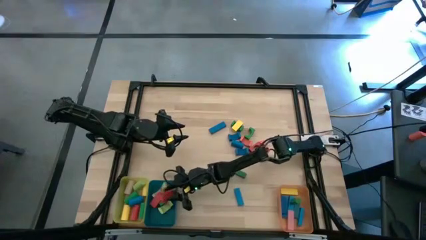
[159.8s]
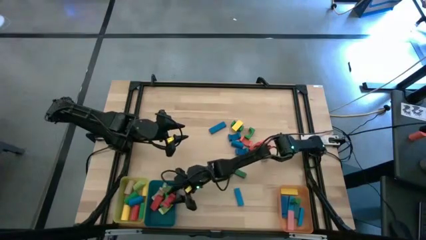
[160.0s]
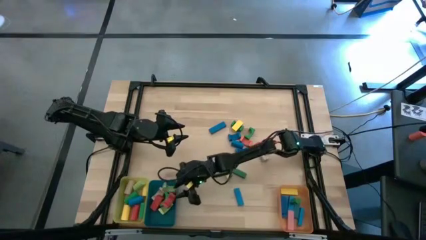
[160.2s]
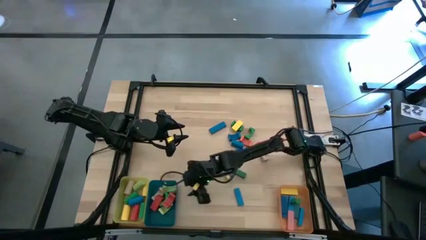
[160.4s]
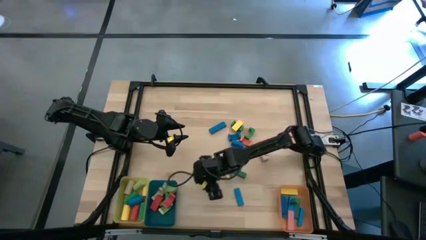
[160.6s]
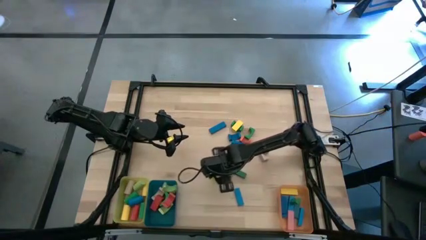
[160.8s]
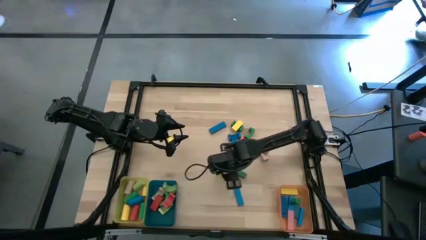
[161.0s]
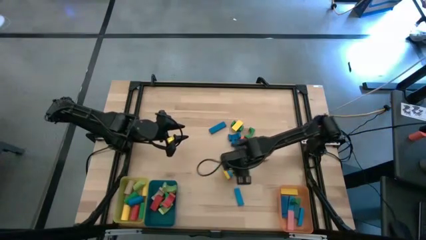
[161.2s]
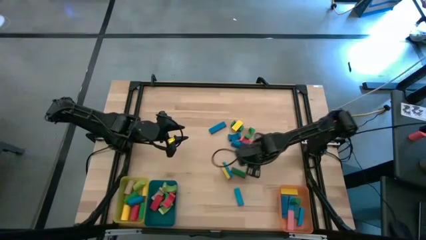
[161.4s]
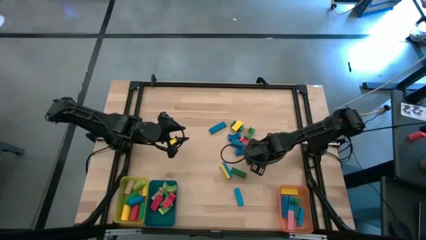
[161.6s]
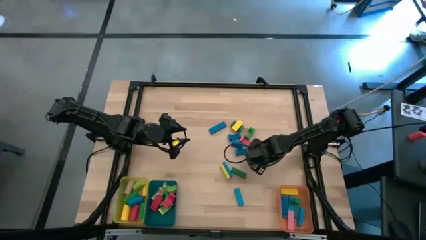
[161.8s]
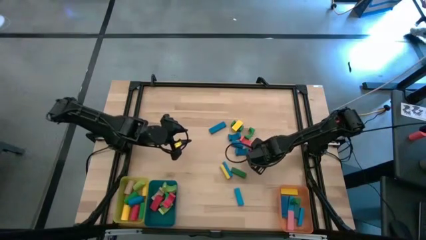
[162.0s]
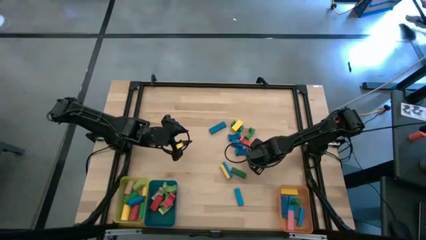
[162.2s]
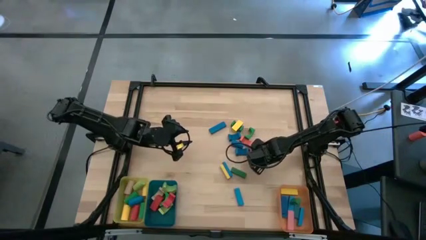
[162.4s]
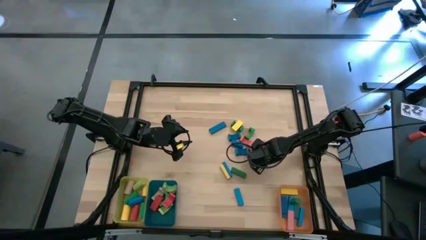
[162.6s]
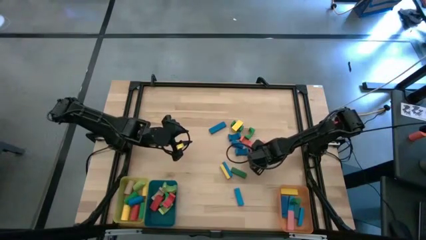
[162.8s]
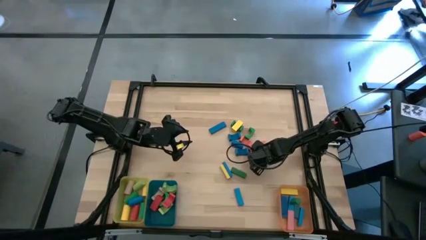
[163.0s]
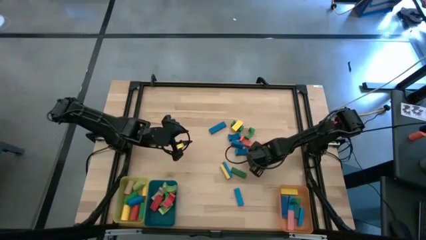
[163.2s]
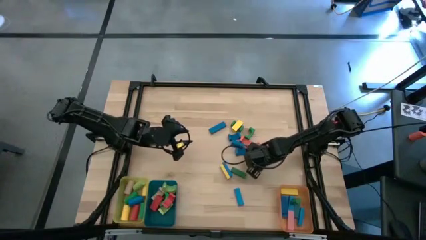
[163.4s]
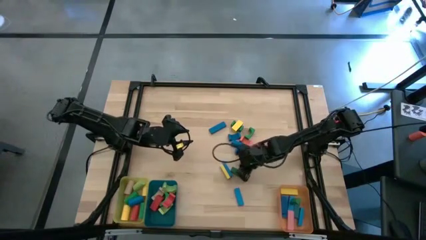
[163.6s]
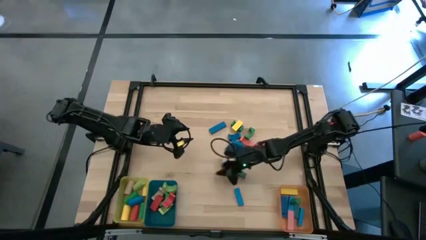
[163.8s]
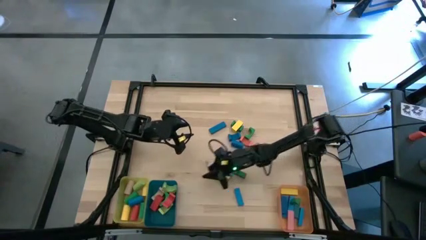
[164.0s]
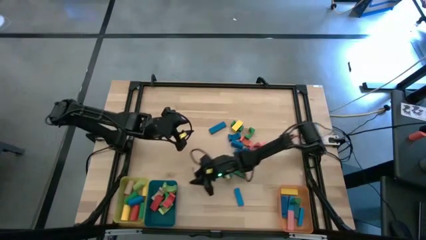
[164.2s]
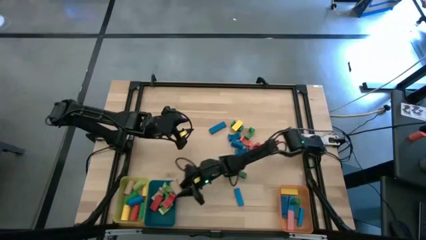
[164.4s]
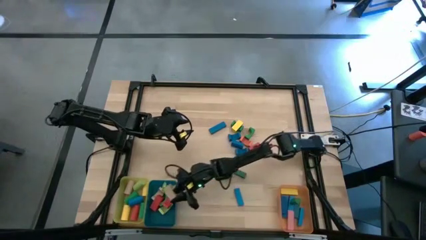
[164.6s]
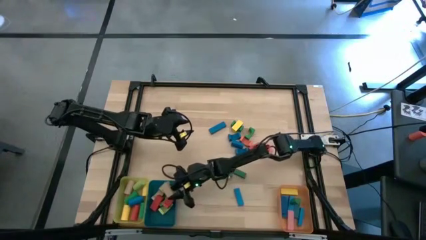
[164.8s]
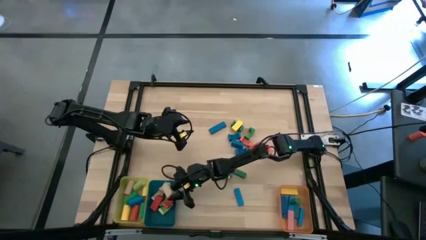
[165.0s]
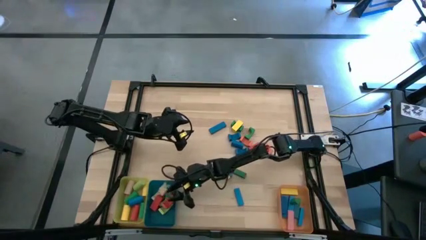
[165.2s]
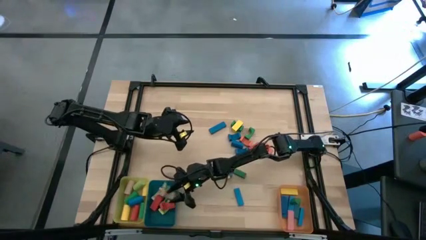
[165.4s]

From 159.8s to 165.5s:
Task: Sort blocks by size
Put the brown arch block into the blue bin

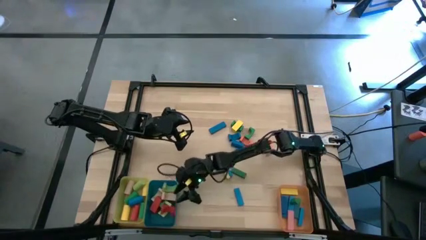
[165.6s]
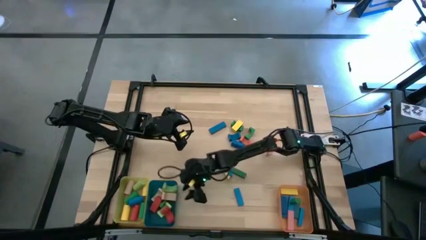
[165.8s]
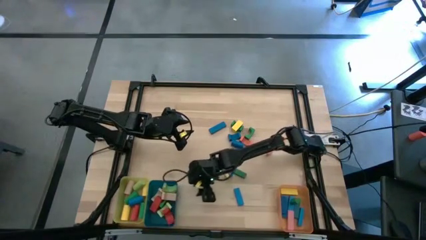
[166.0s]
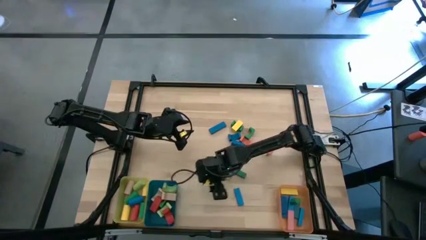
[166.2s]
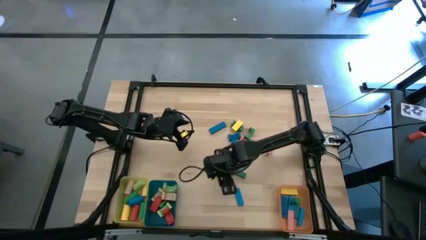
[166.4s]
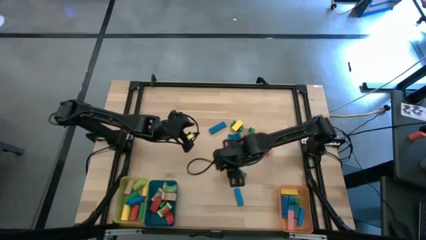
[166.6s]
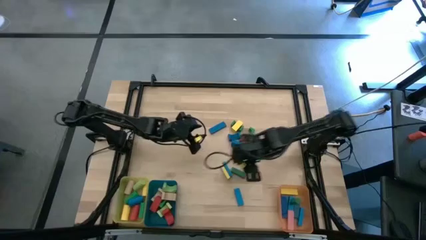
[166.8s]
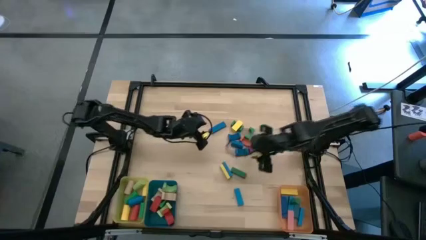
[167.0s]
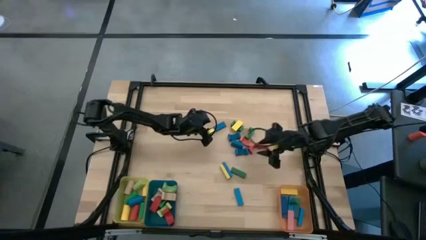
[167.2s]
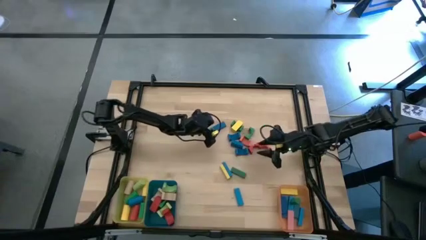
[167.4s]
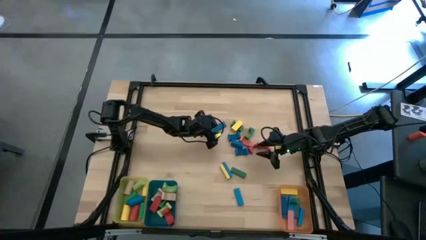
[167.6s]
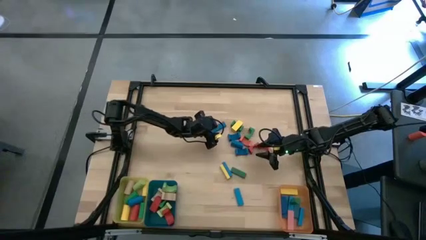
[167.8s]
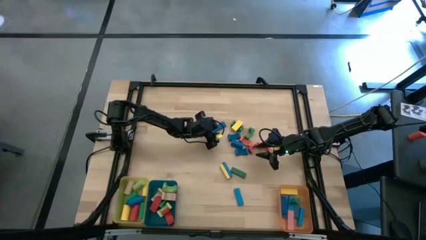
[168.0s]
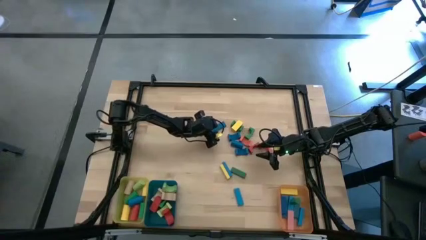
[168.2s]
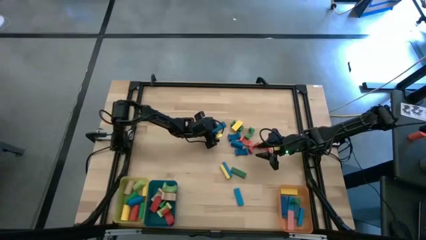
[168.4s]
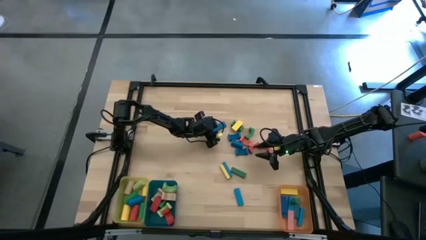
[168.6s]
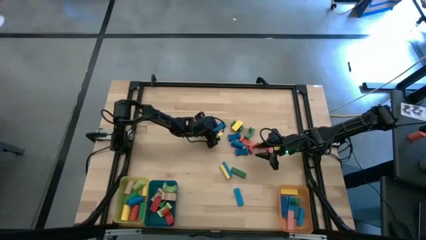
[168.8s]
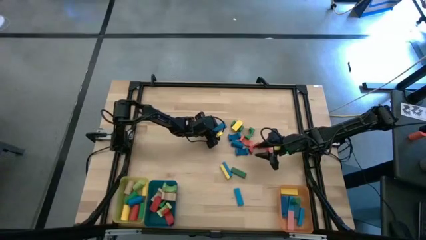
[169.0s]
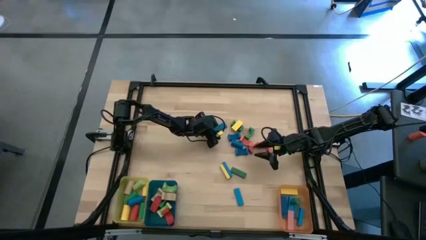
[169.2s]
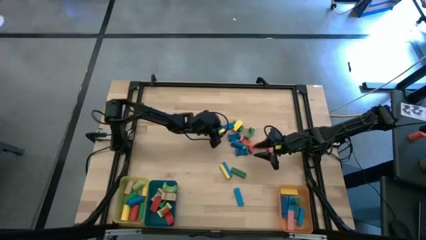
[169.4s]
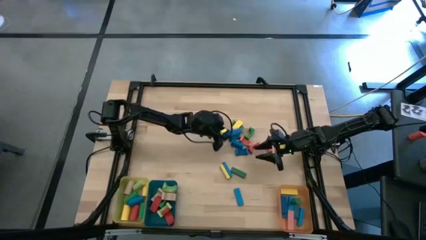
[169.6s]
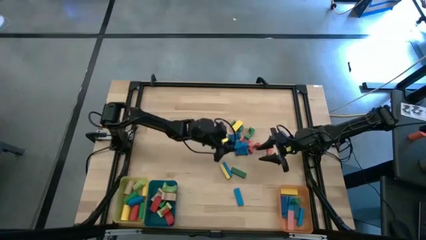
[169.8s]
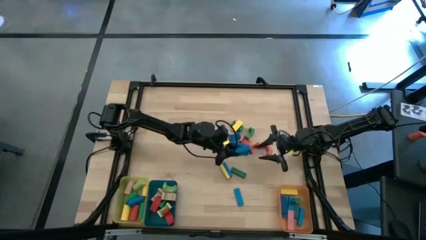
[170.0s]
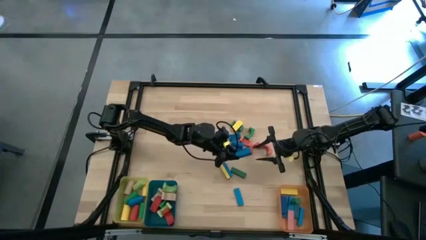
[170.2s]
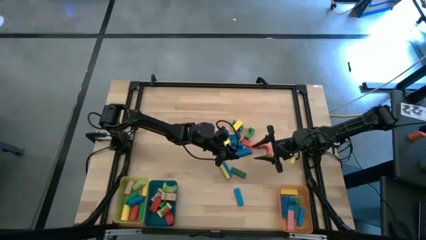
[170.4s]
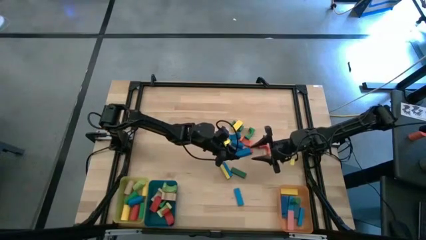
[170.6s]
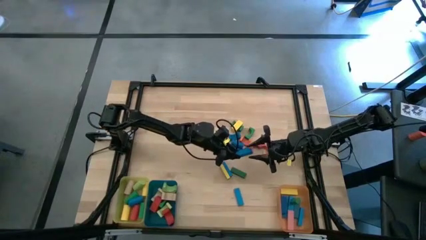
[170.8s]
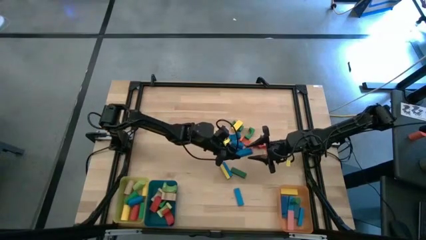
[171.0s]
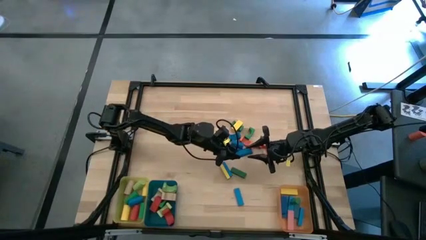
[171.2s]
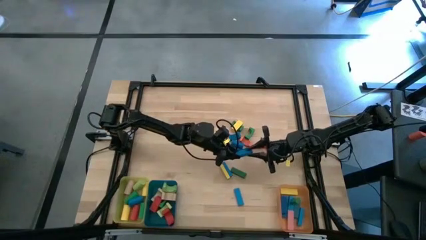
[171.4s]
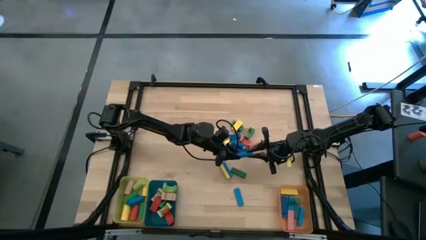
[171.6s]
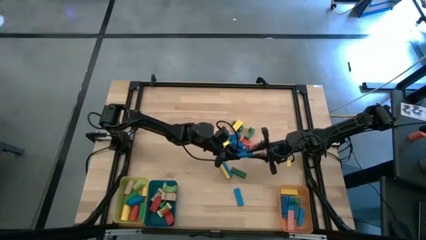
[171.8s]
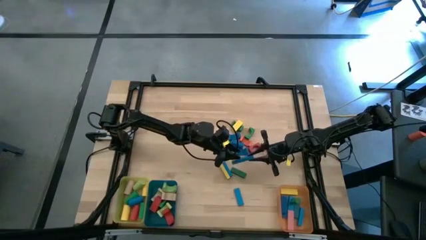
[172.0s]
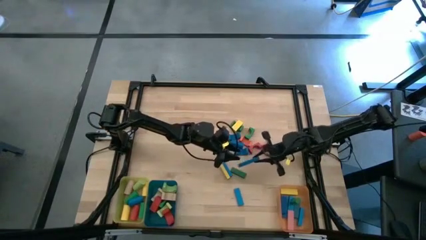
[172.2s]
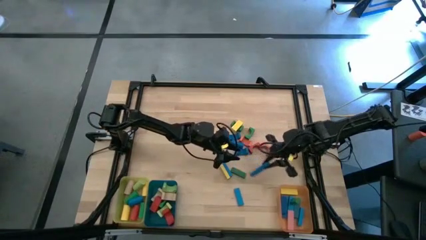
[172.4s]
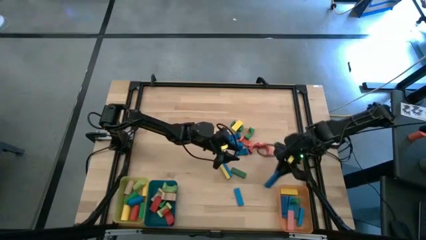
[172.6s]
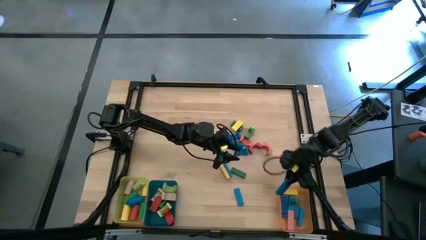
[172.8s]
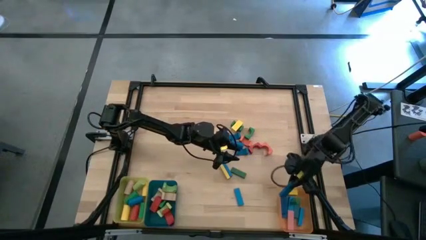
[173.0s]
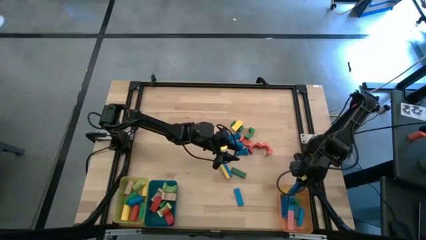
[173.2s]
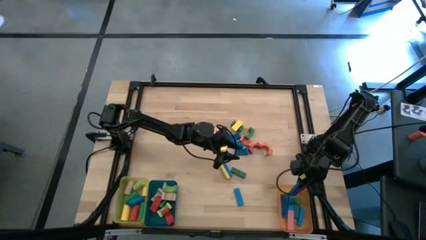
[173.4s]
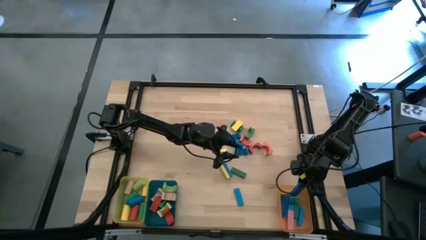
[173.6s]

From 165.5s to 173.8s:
Put the blue rectangular block into the orange bin

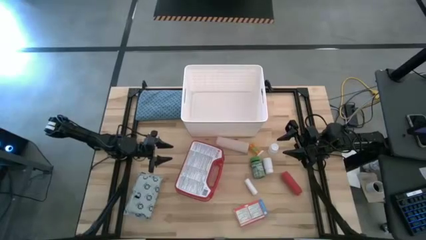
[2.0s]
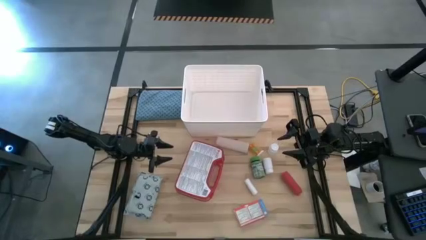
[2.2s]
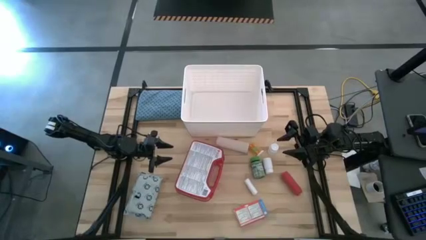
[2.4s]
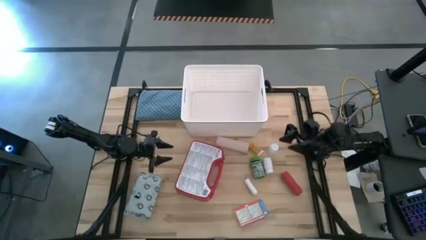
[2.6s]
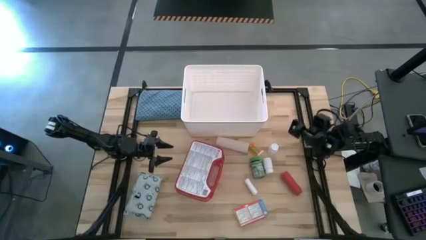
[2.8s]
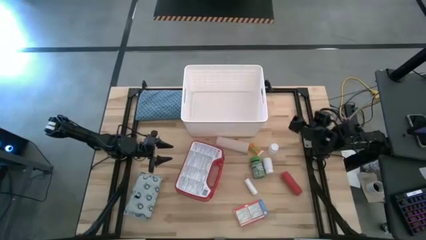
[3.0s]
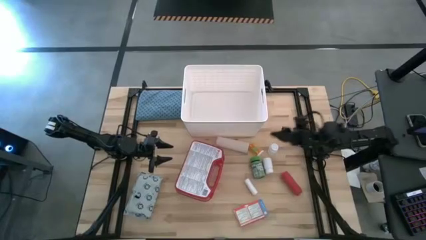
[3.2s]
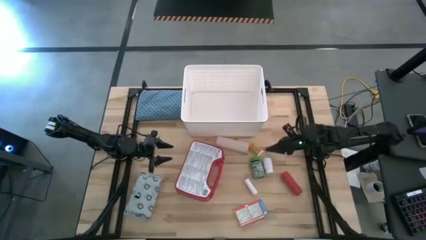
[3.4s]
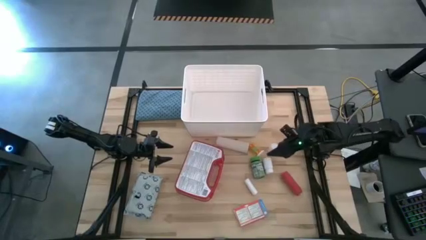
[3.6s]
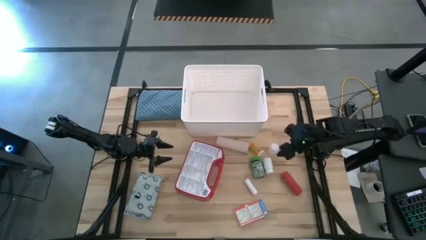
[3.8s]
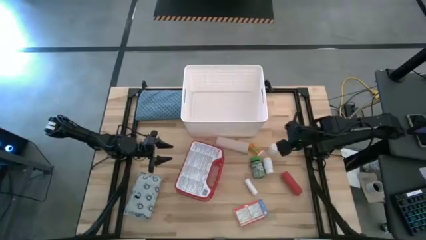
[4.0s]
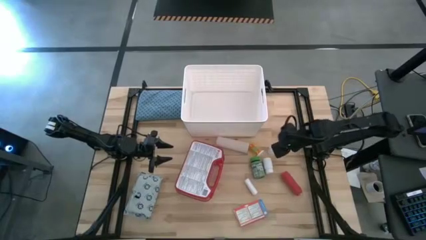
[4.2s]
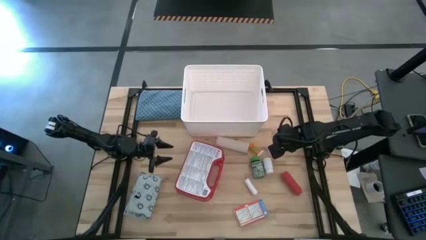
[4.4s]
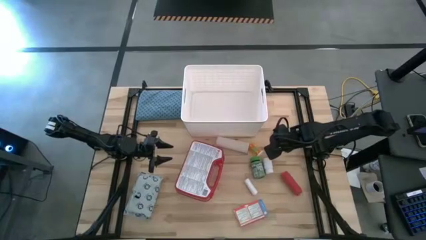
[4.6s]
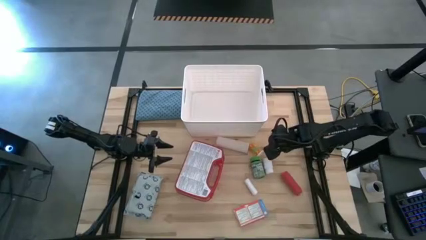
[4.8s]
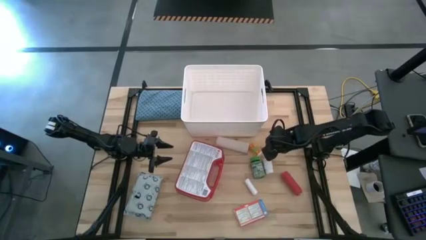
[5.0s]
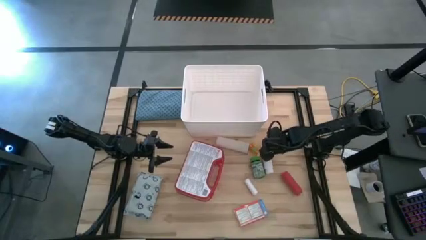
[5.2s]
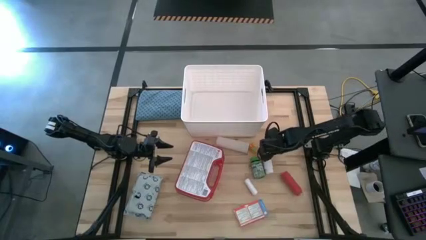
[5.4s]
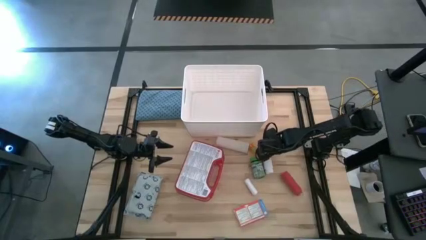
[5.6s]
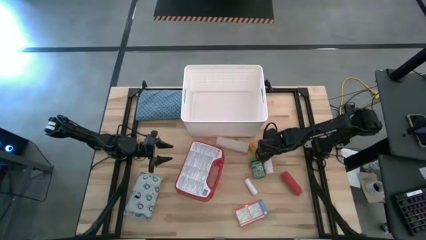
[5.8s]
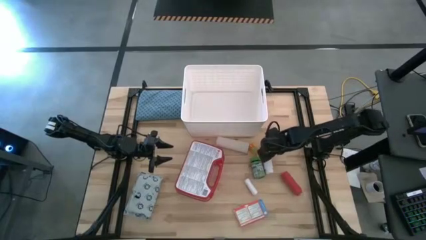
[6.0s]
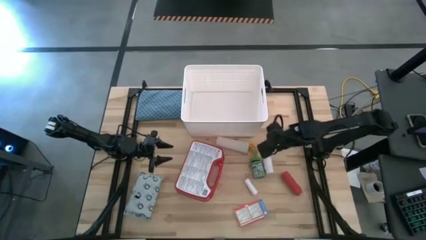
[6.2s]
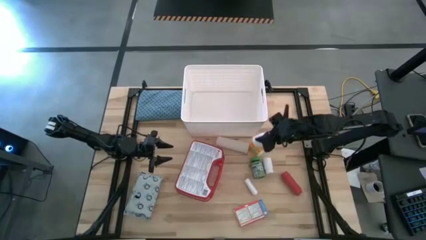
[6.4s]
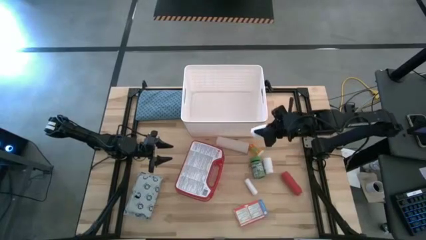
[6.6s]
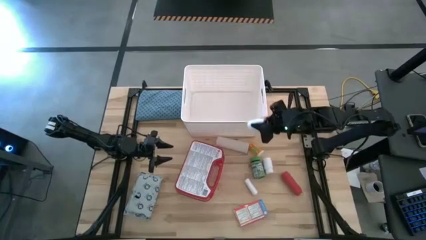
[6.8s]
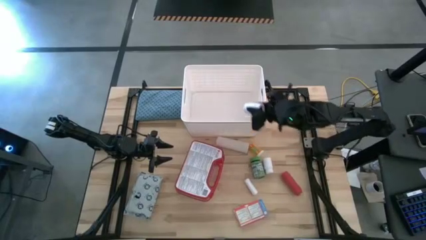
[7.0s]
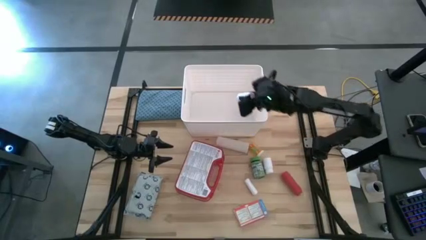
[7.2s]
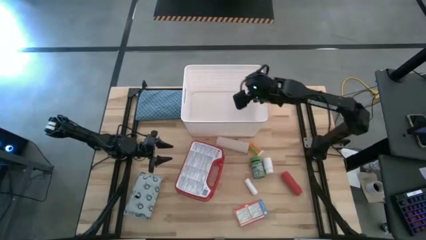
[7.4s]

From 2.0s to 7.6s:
Task: Pick & place medical supplies in basket/bin
Put the top white pill bottle into the white bin
